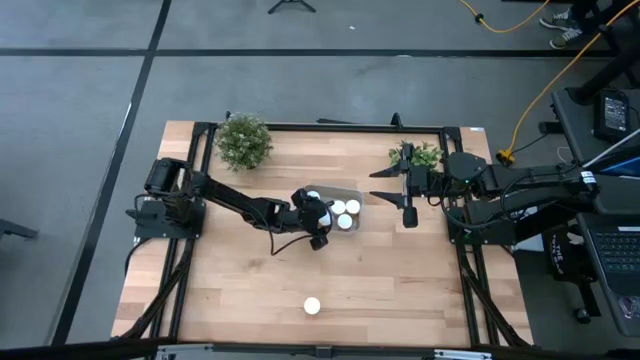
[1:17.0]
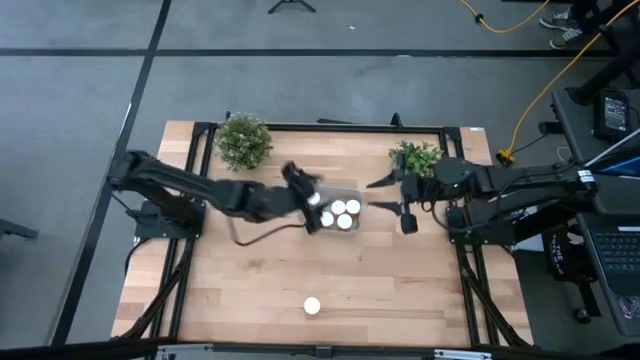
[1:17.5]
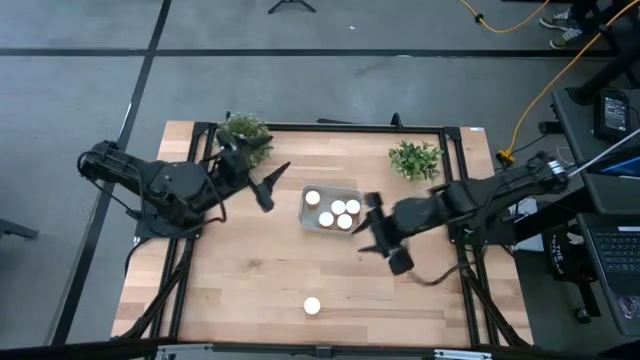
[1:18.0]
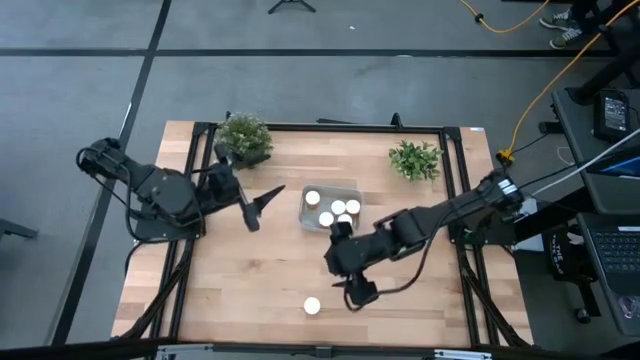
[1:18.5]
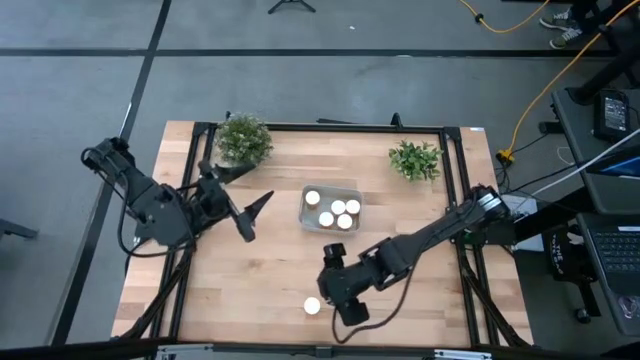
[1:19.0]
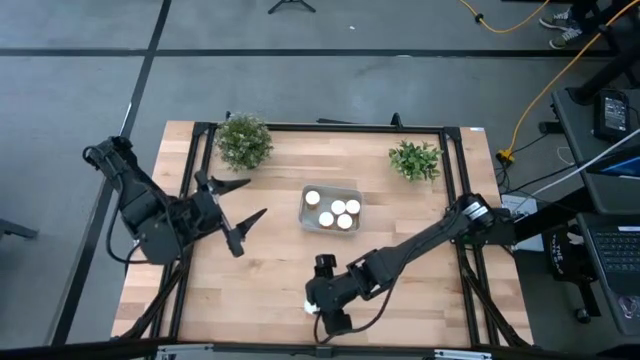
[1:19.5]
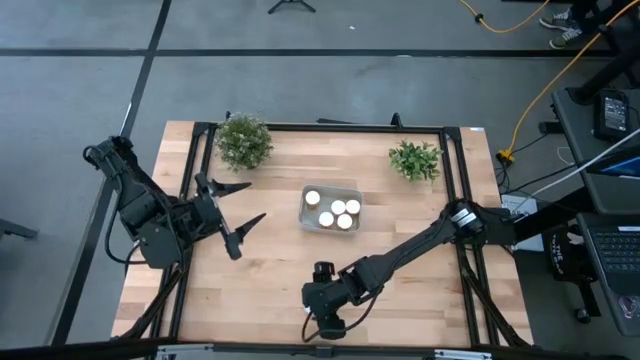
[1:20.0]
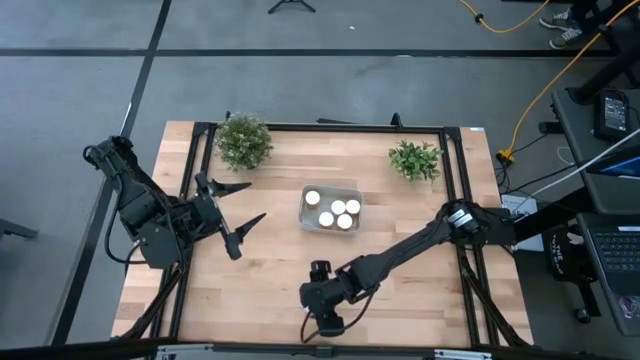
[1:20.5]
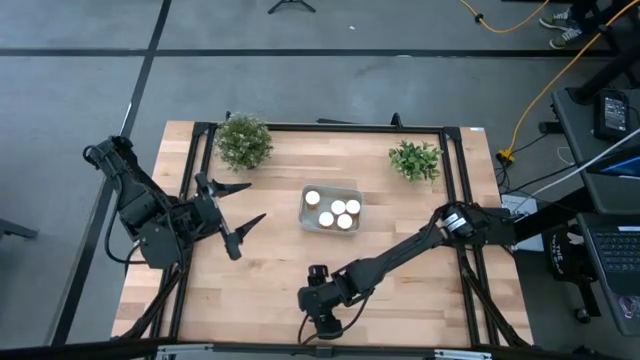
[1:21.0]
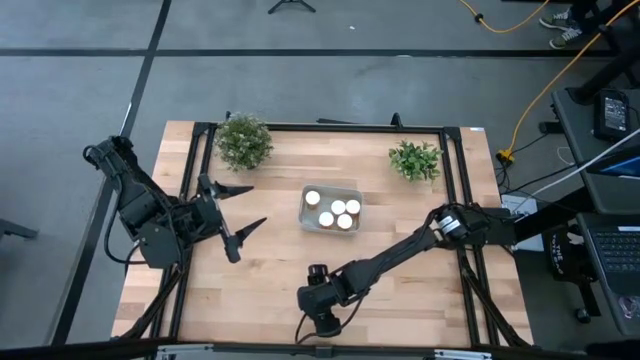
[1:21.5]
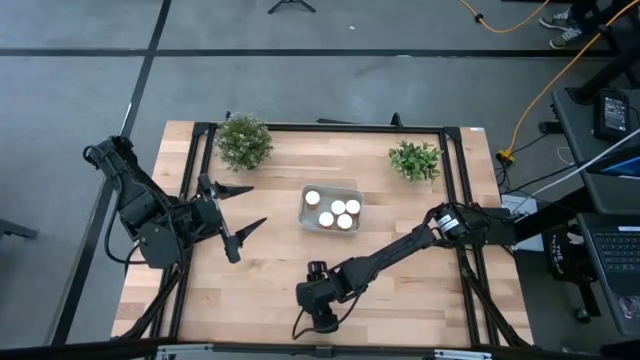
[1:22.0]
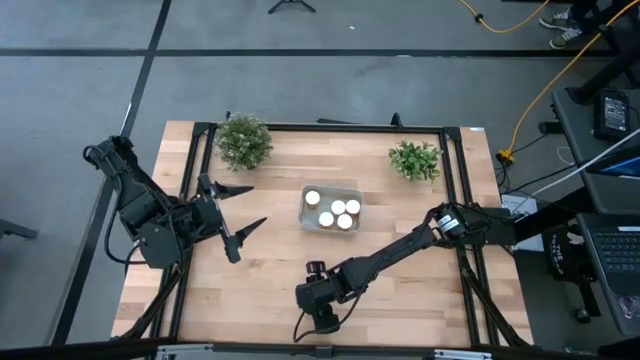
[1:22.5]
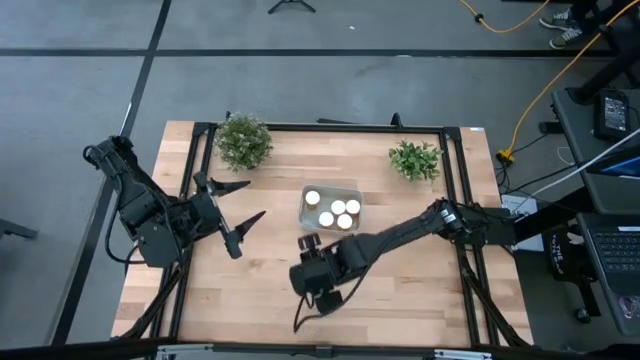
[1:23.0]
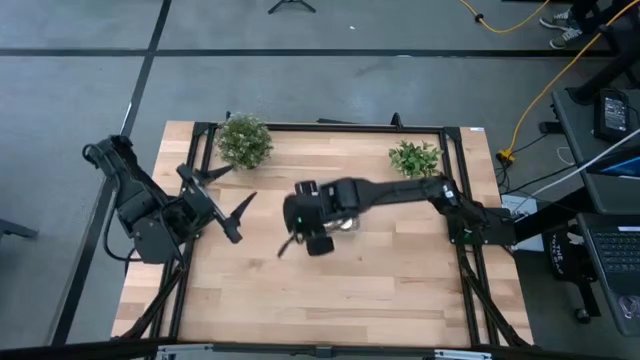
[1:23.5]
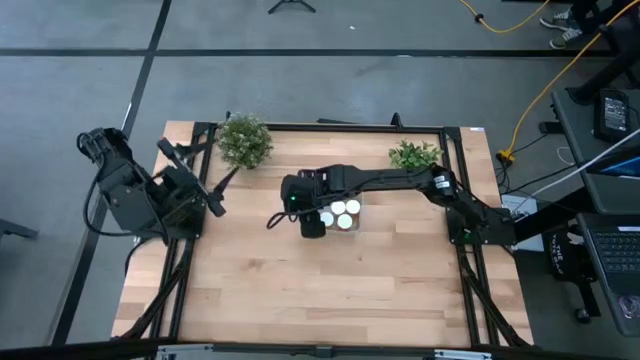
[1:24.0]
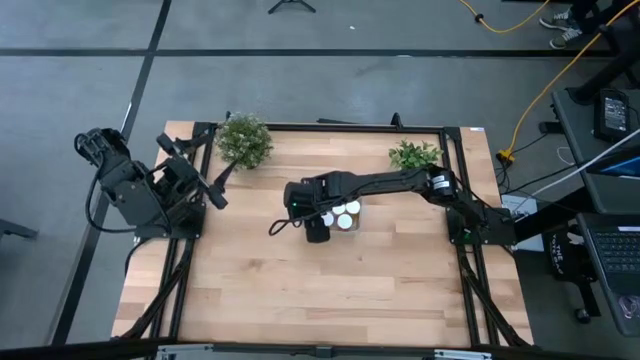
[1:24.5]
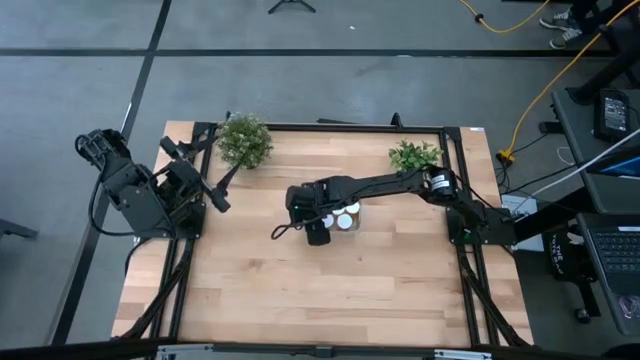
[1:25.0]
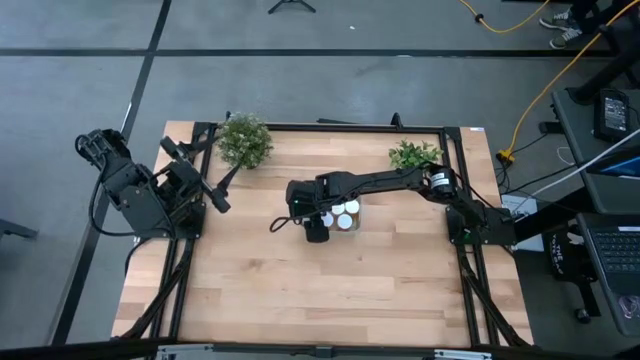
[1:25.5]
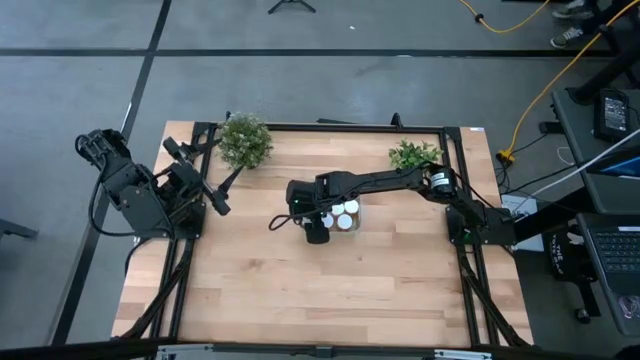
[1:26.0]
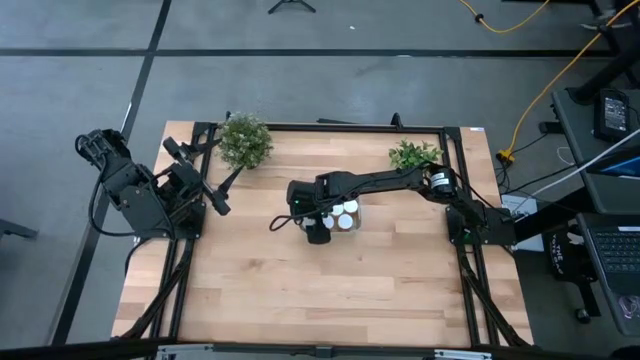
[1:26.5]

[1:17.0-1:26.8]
Task: Pick and place pill bottles into a basket
Put the orange pill bottle into the gray bin

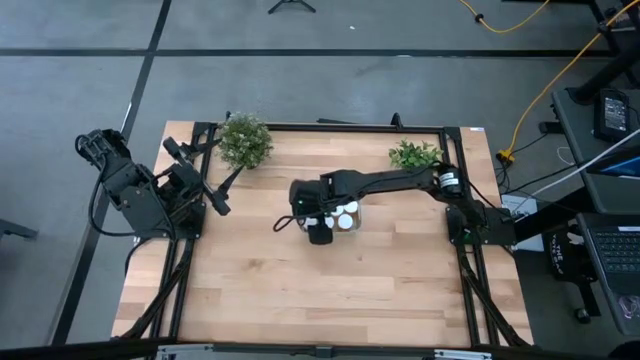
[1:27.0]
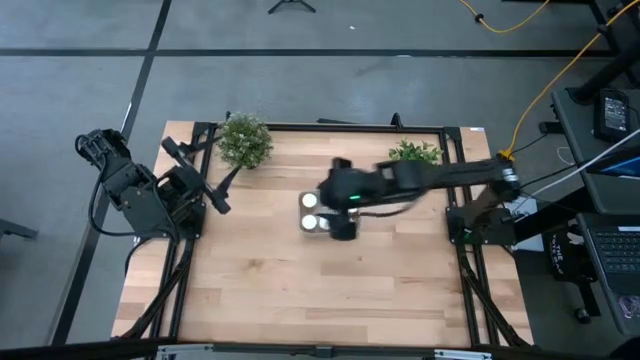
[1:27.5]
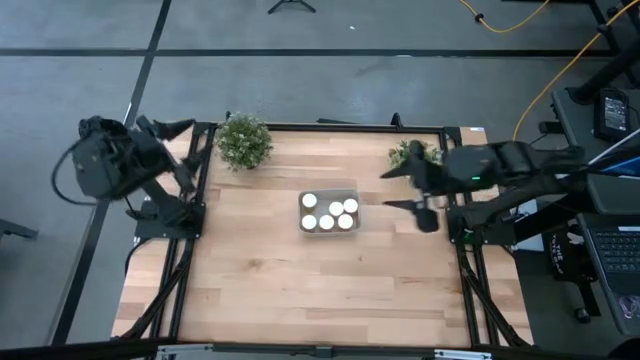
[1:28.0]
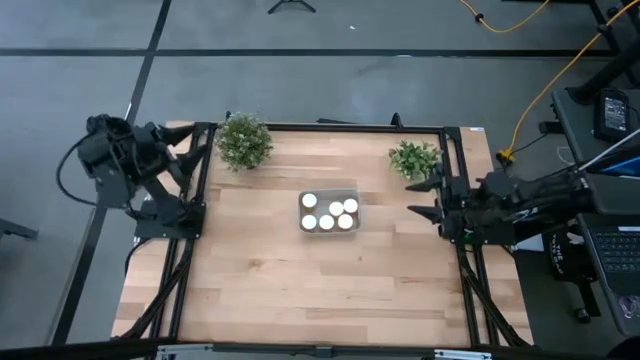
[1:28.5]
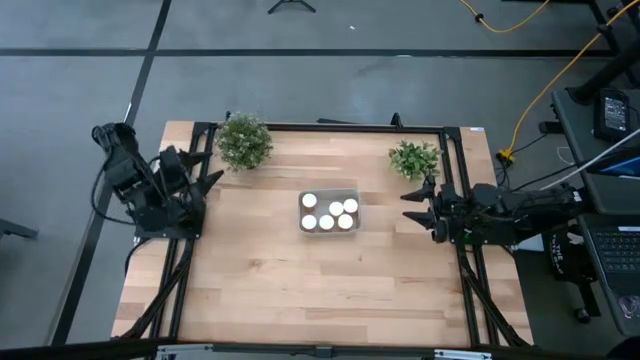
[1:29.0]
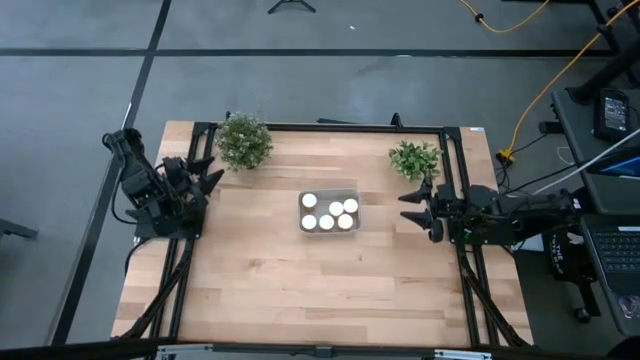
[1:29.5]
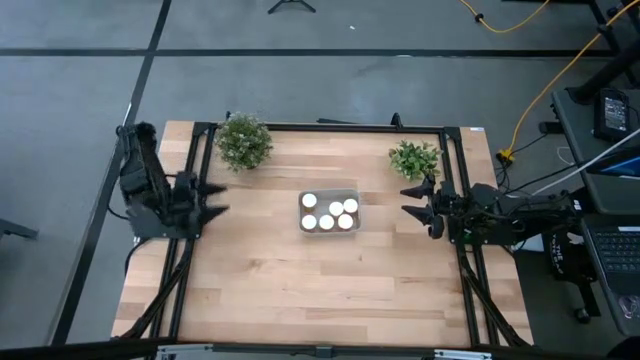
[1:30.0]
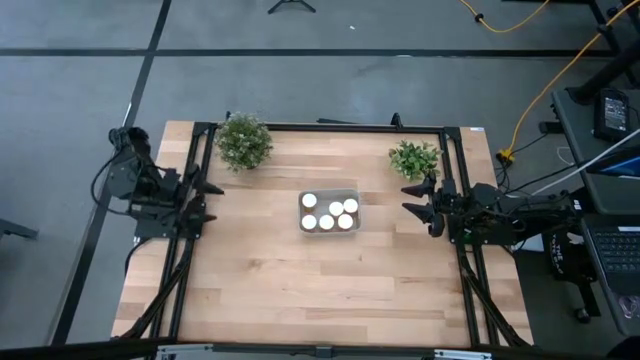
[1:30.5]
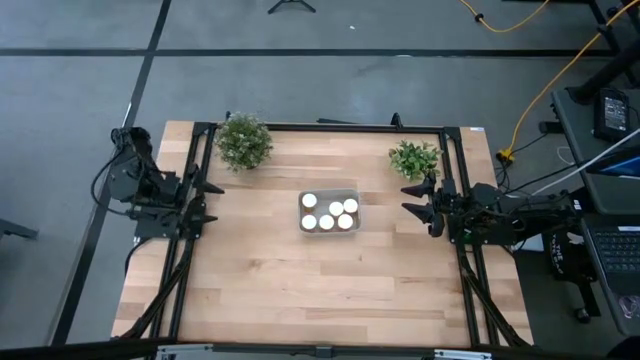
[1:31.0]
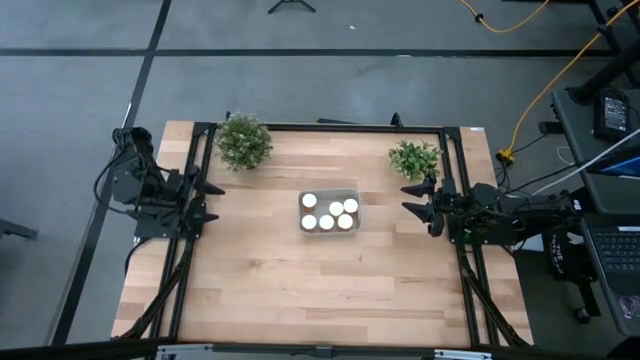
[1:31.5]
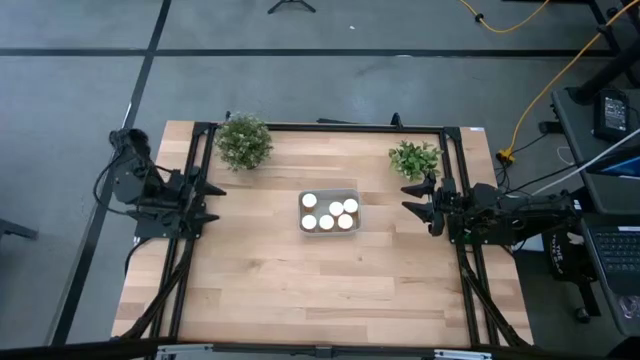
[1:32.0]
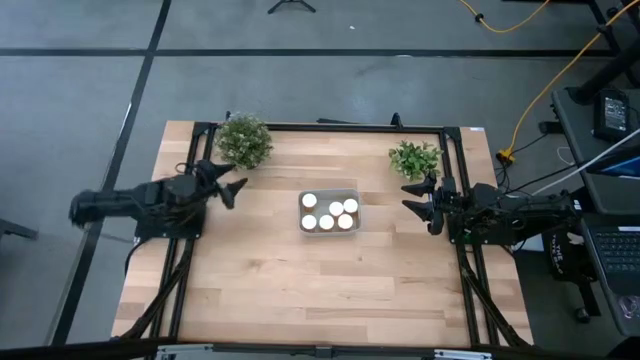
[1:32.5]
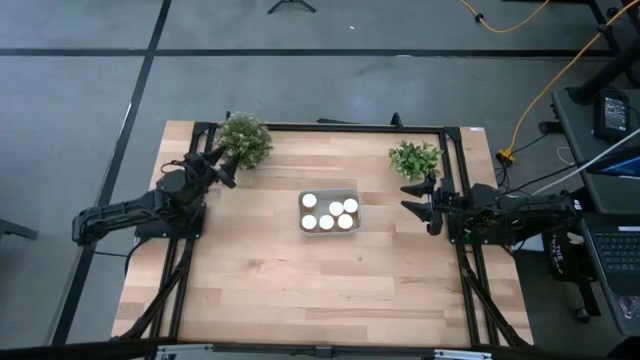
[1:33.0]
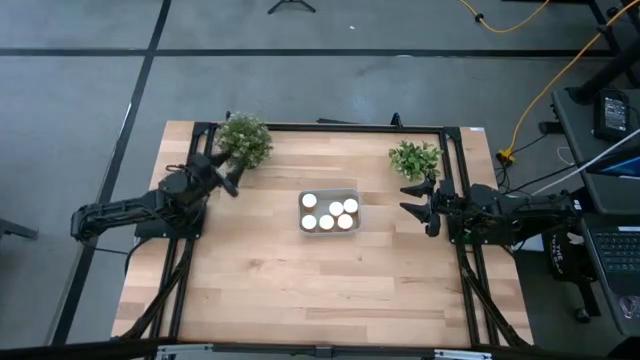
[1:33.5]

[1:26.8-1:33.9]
Return to Home Position

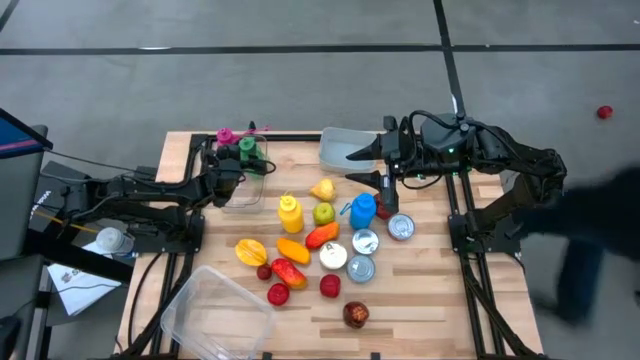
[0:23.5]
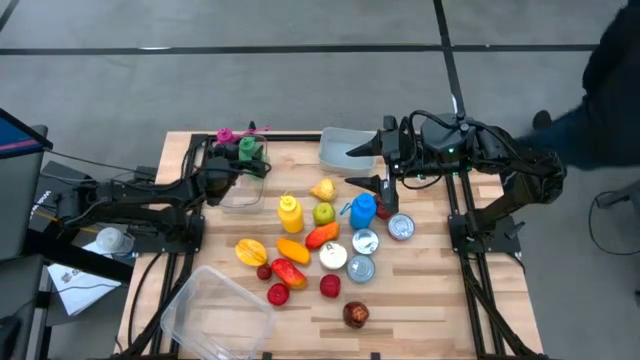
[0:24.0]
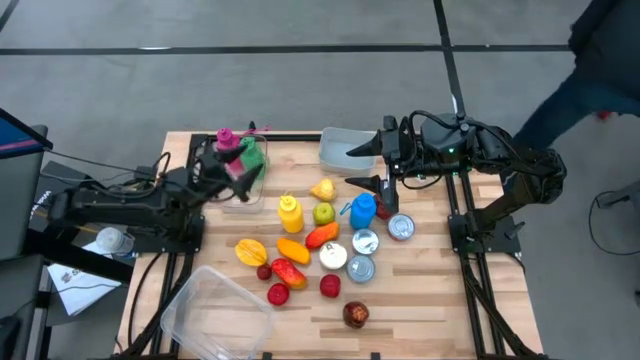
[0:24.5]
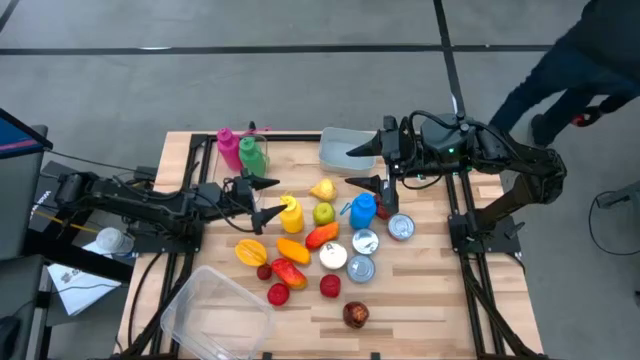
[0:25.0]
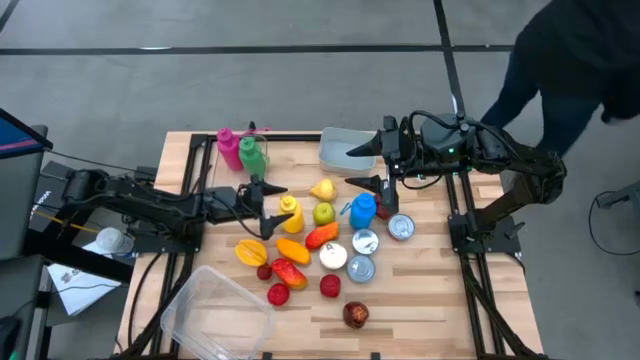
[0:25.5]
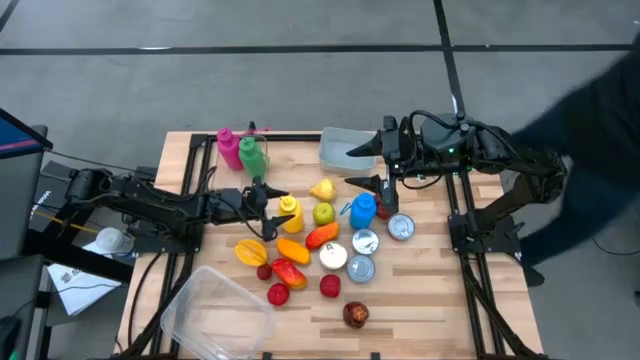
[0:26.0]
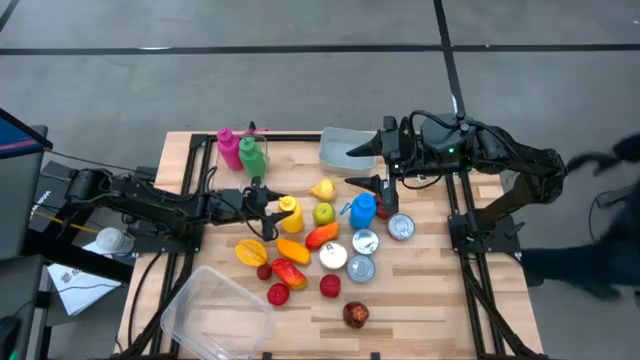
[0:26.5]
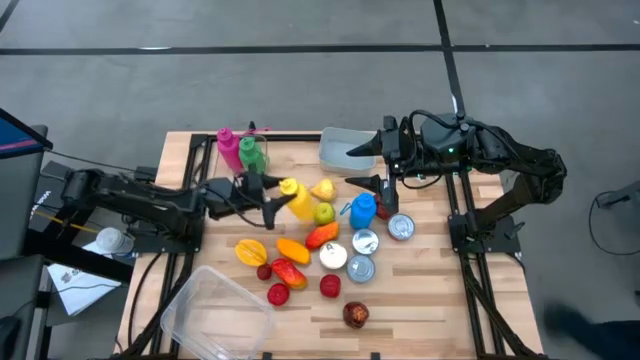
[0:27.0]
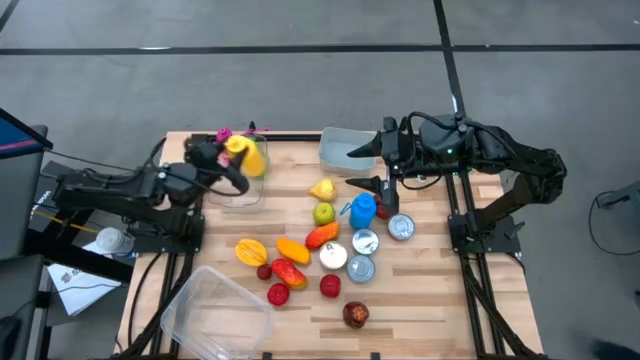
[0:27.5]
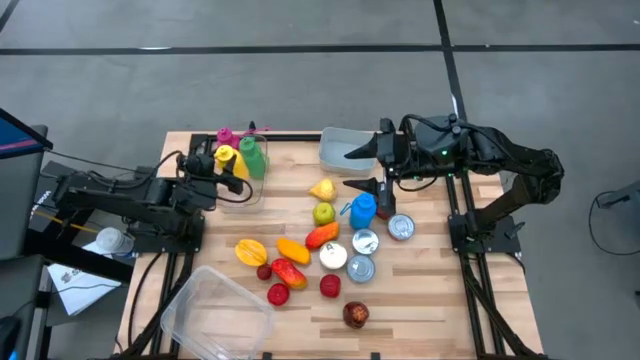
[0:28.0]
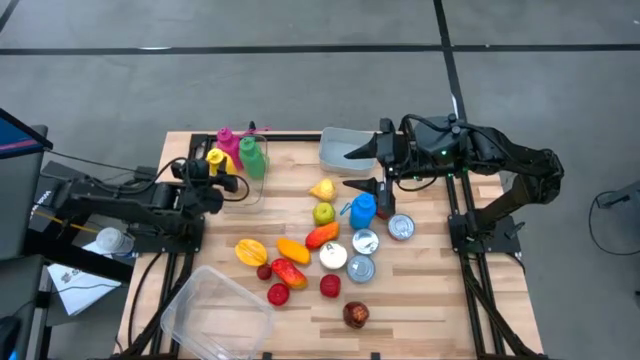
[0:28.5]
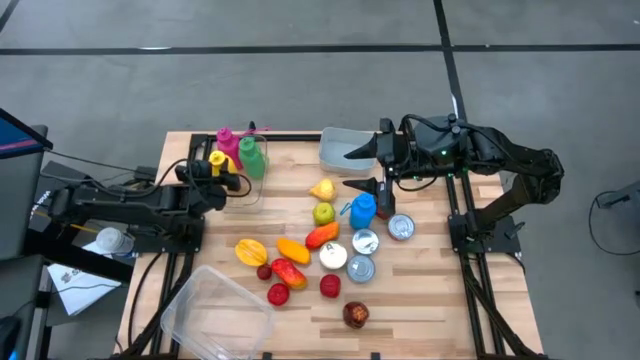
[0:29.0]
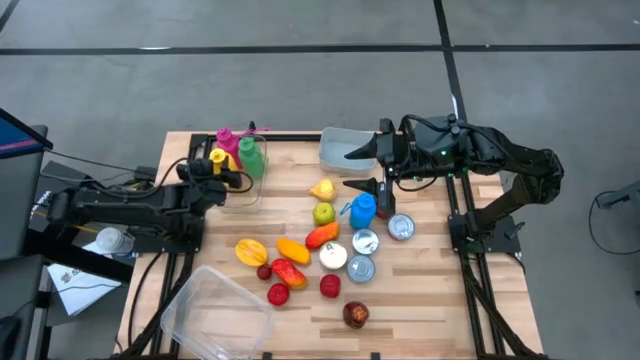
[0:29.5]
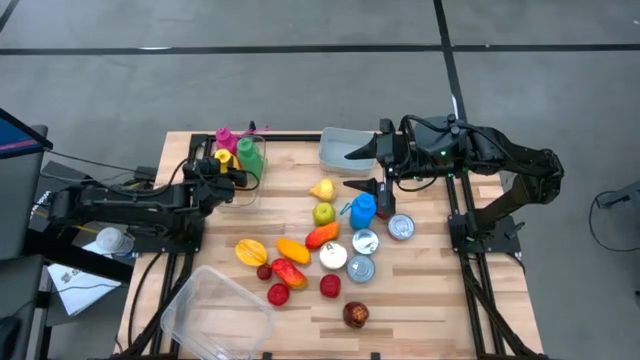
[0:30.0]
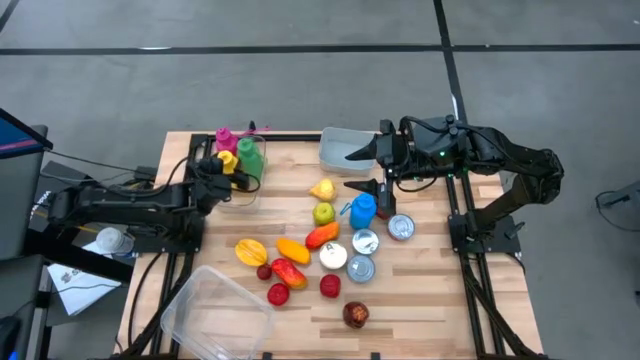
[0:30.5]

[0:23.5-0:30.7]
Task: Pick & Place Food Item
Put the yellow water bottle into the transparent bin
